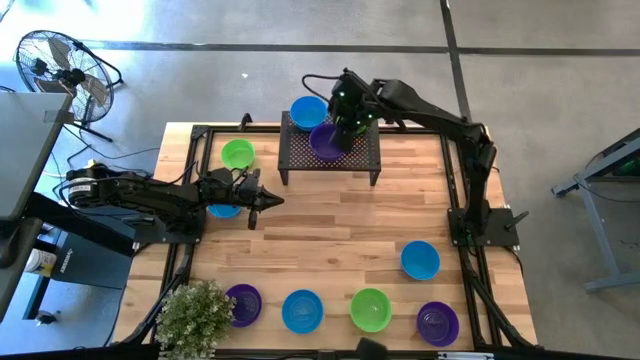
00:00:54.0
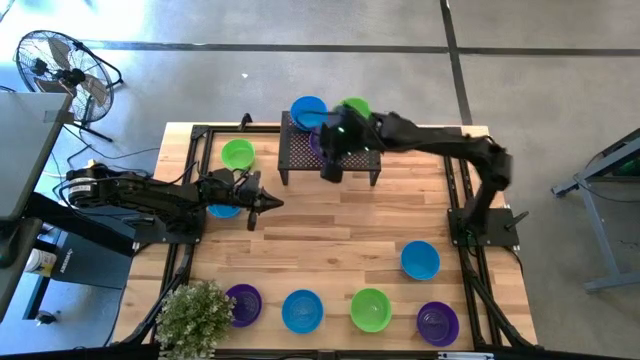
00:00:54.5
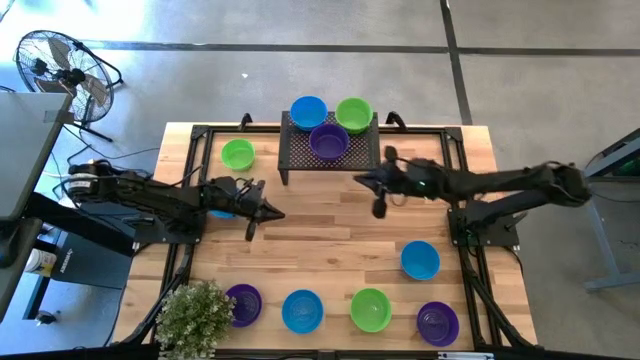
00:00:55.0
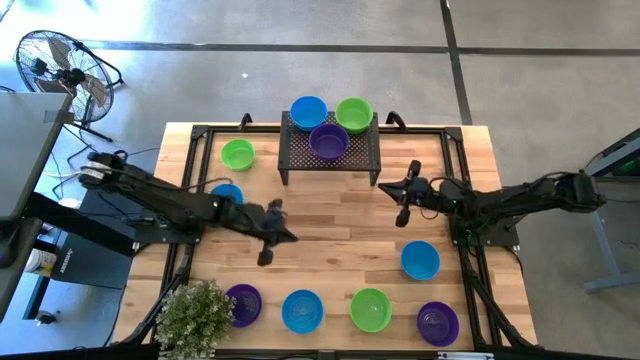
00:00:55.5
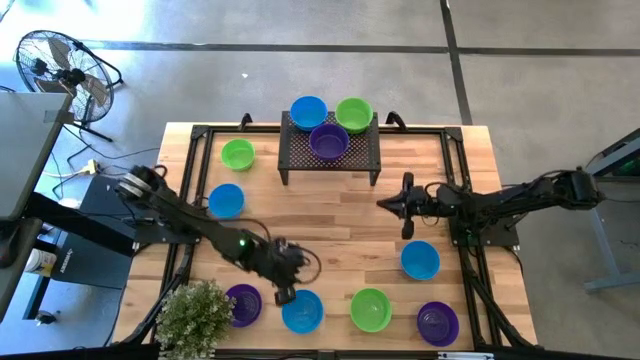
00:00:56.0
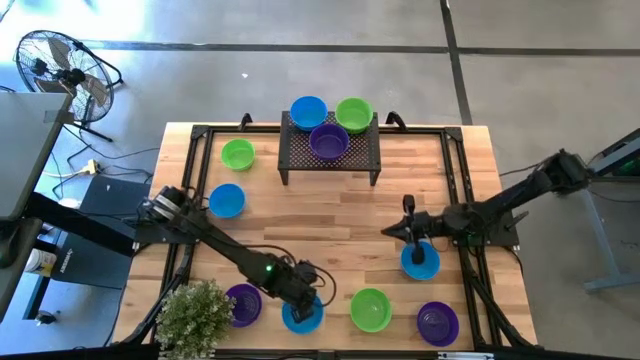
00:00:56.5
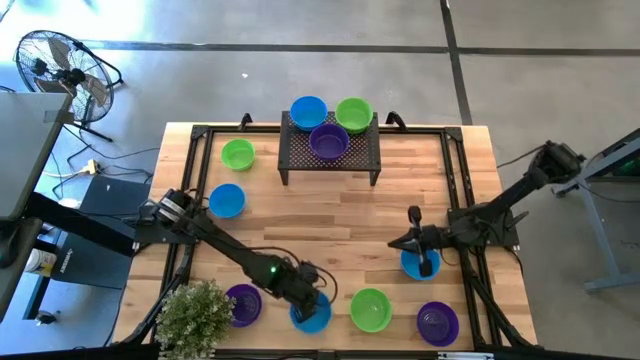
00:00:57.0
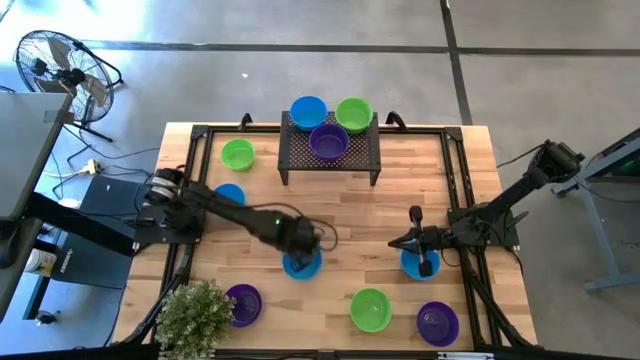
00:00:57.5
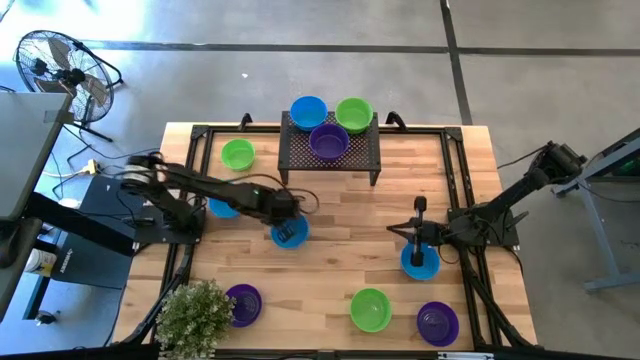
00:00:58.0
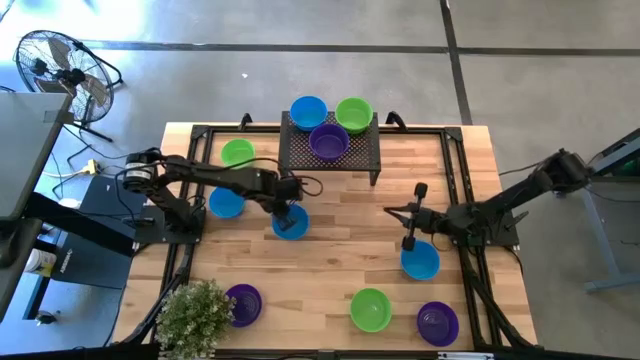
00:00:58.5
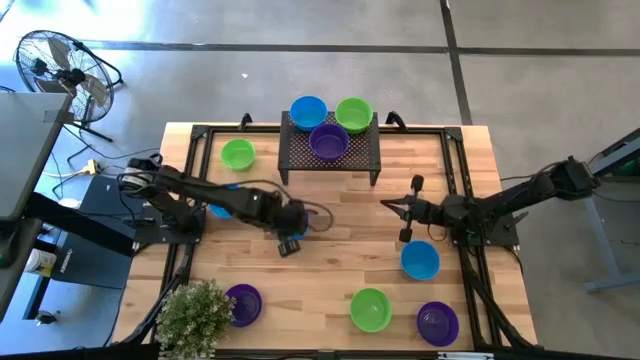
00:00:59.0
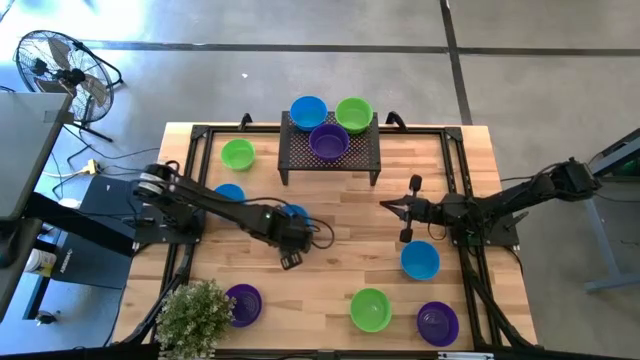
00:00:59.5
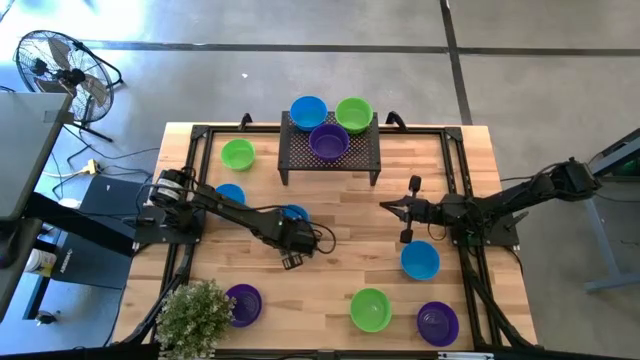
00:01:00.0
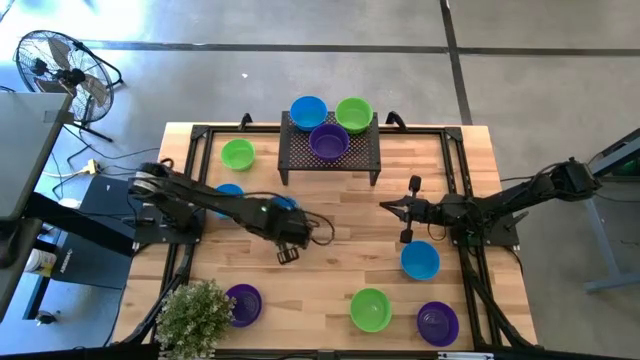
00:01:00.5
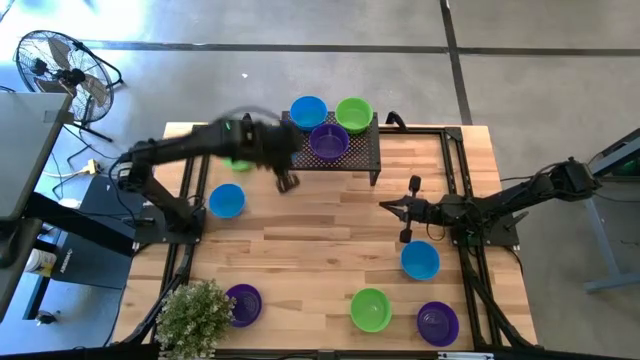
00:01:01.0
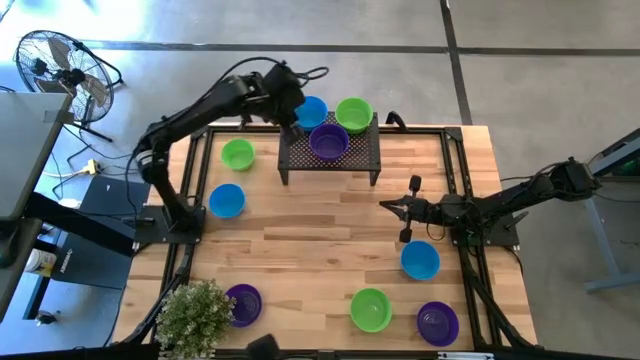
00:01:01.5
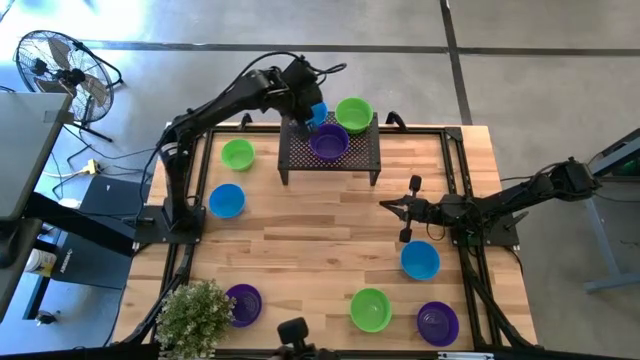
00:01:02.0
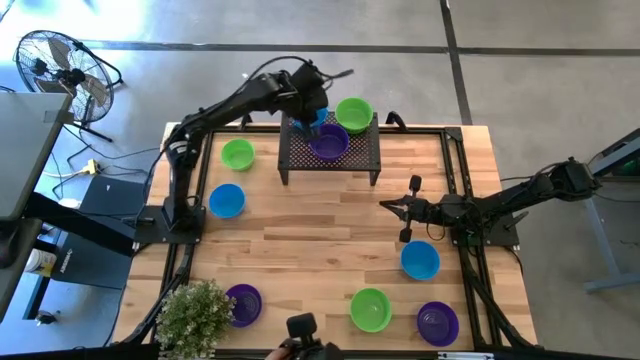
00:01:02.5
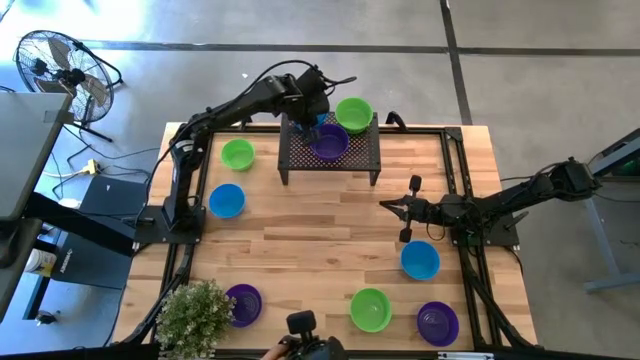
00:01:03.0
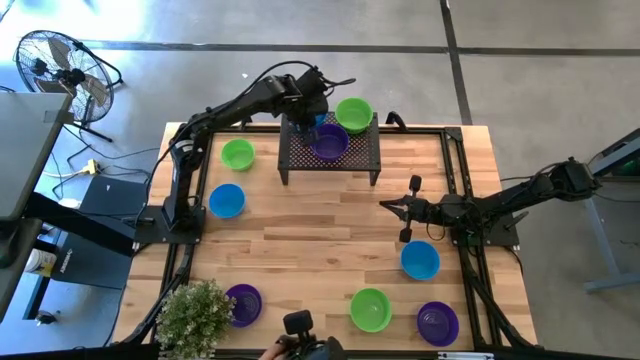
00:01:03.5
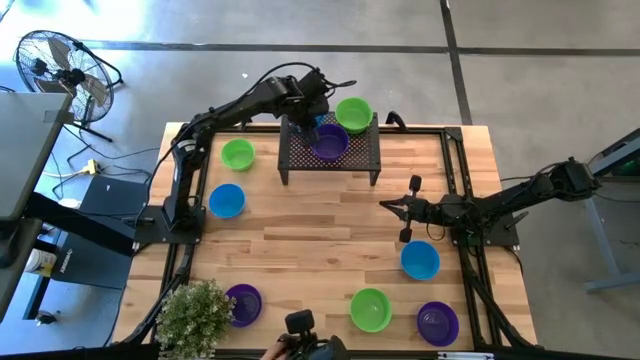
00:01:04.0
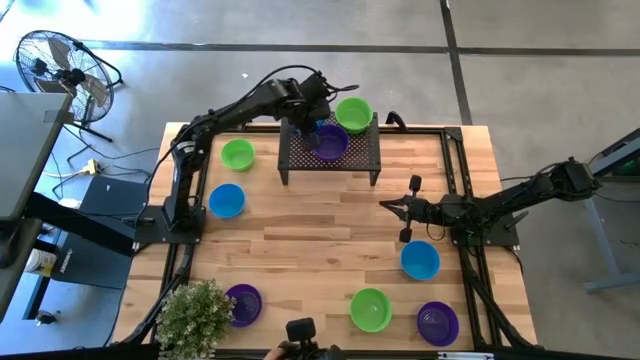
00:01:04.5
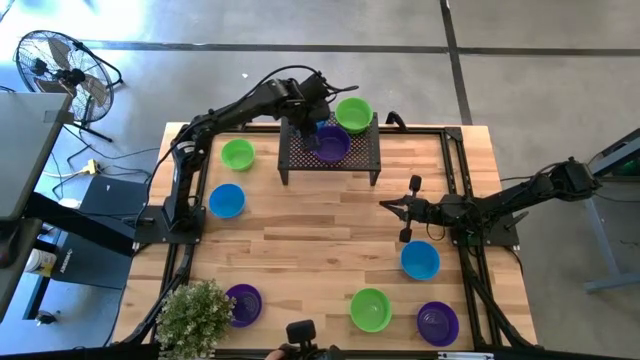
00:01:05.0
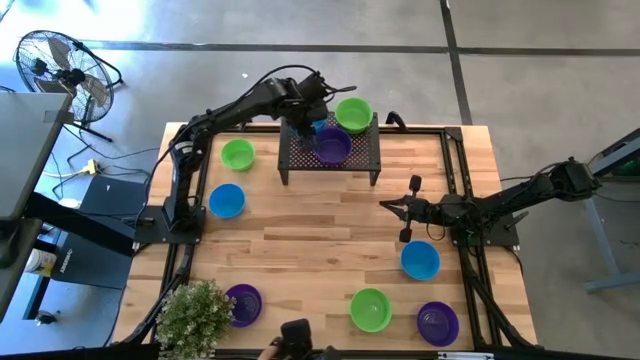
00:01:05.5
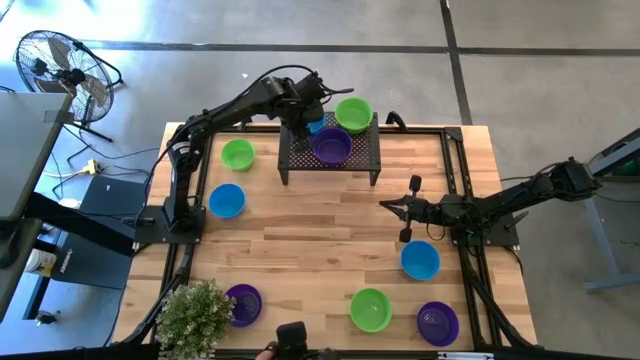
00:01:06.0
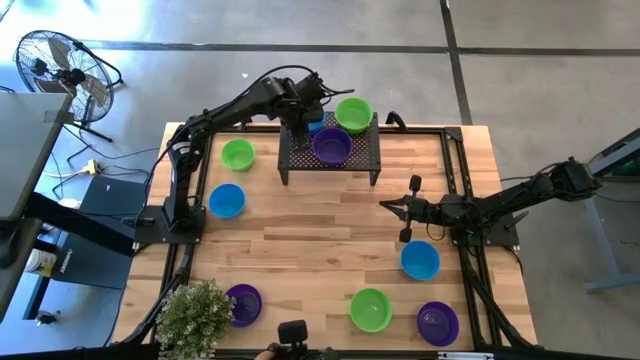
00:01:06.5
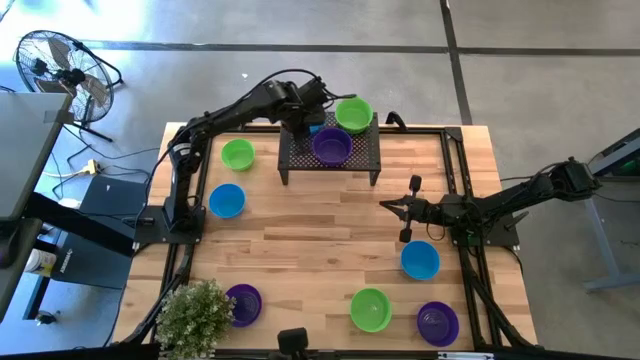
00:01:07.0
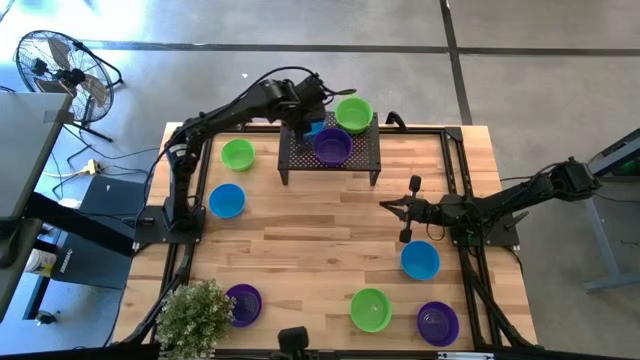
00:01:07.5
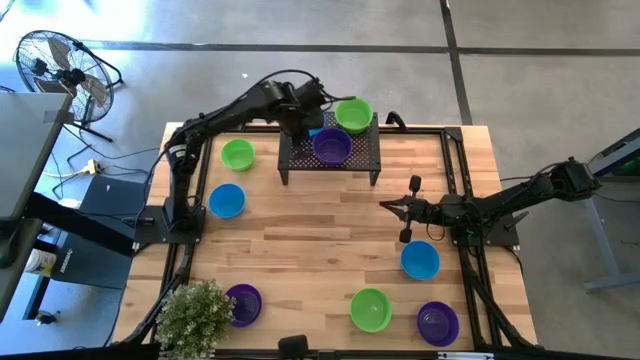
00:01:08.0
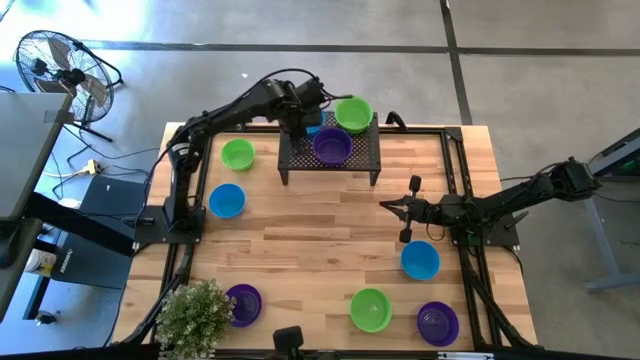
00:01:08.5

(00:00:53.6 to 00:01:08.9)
Task: Pick & Place Mini bowls
Stack the bottom blue bowl on the blue bowl on the shelf

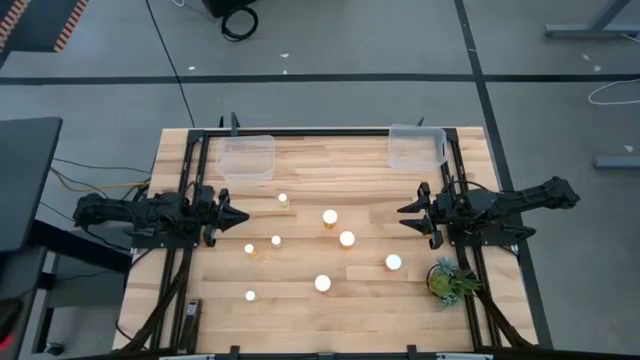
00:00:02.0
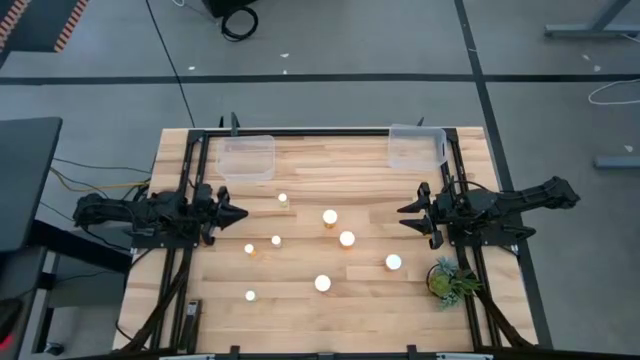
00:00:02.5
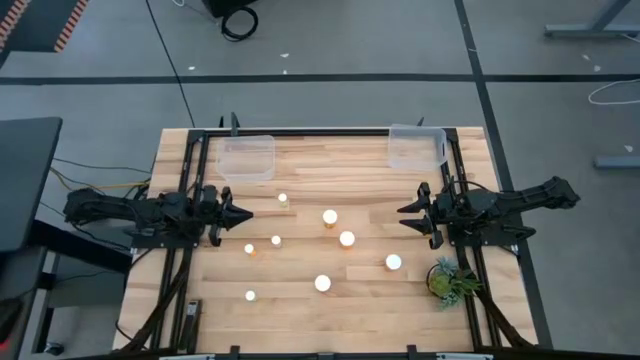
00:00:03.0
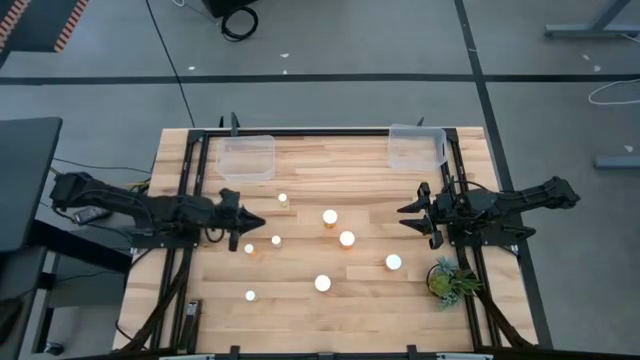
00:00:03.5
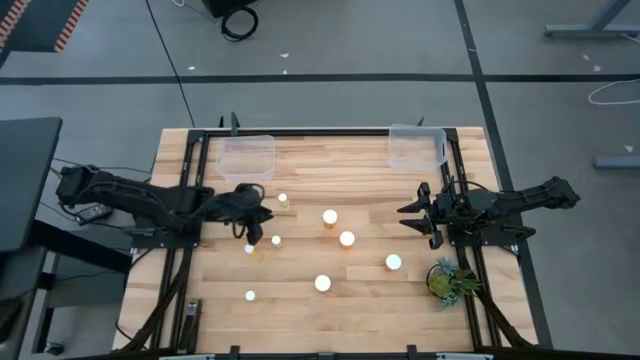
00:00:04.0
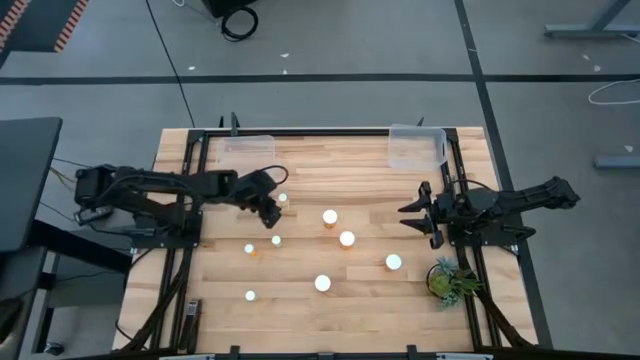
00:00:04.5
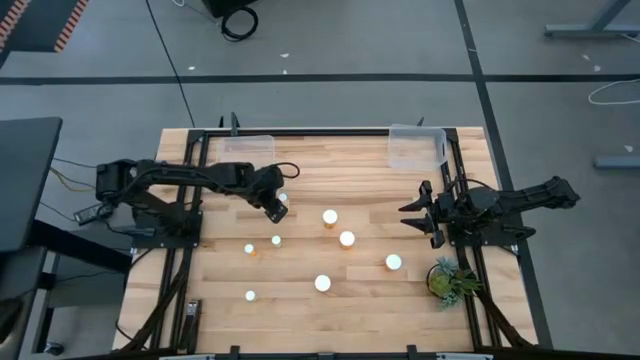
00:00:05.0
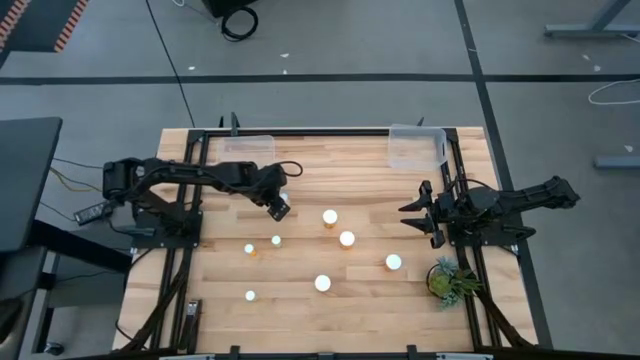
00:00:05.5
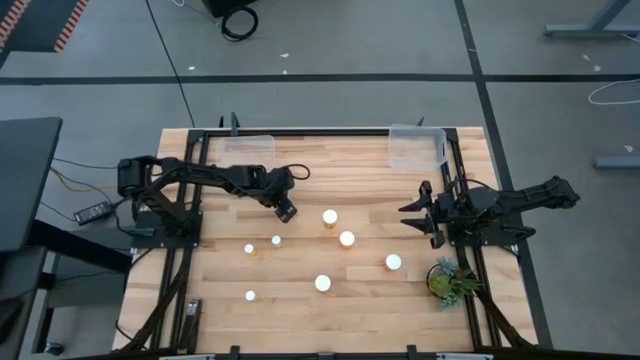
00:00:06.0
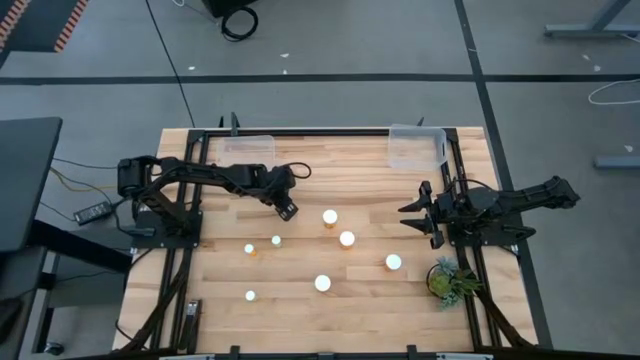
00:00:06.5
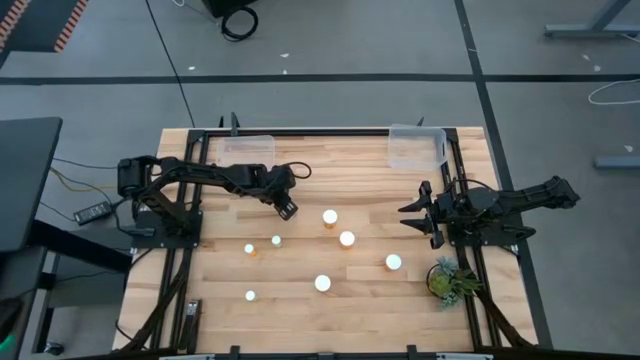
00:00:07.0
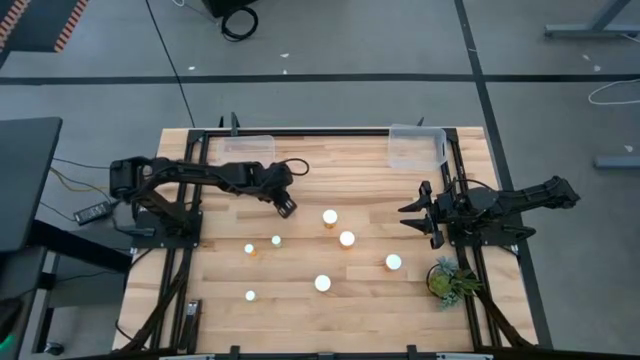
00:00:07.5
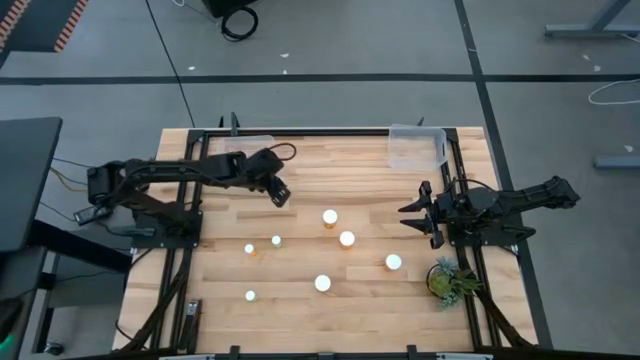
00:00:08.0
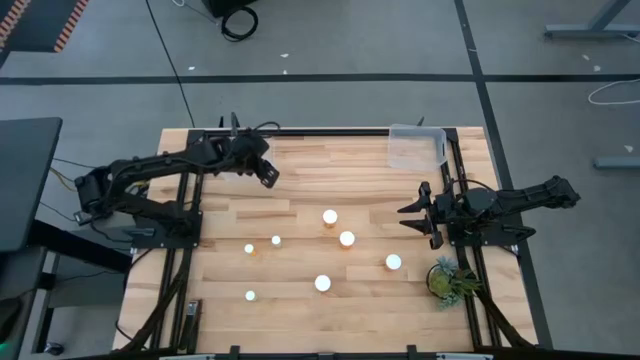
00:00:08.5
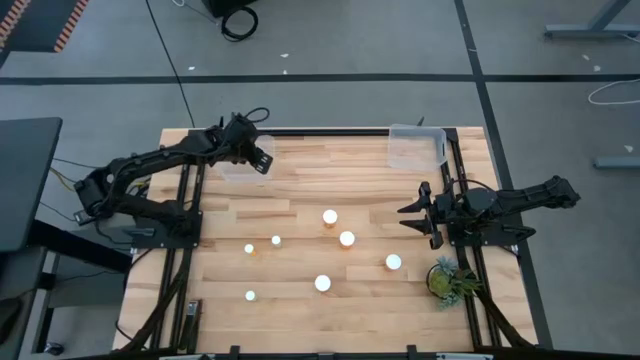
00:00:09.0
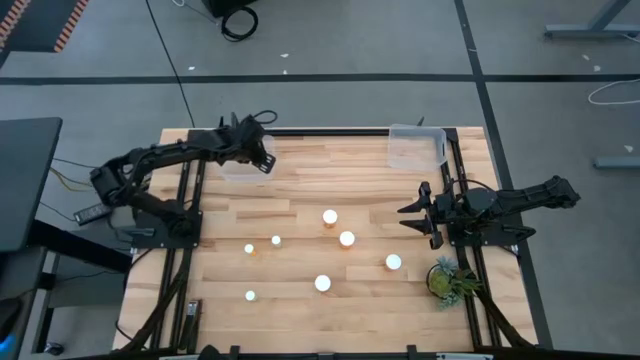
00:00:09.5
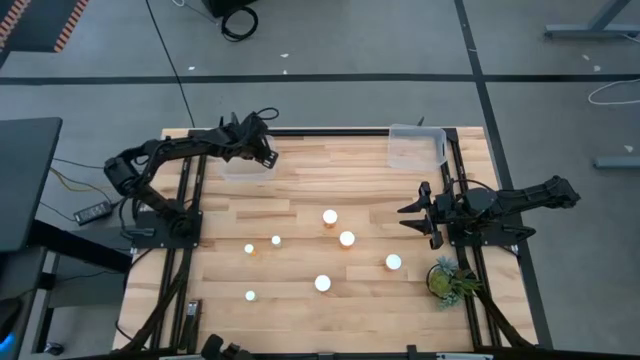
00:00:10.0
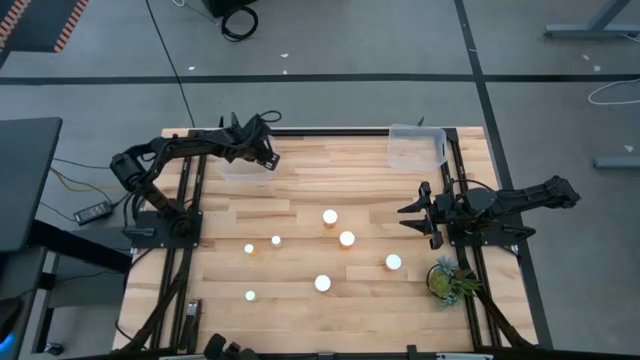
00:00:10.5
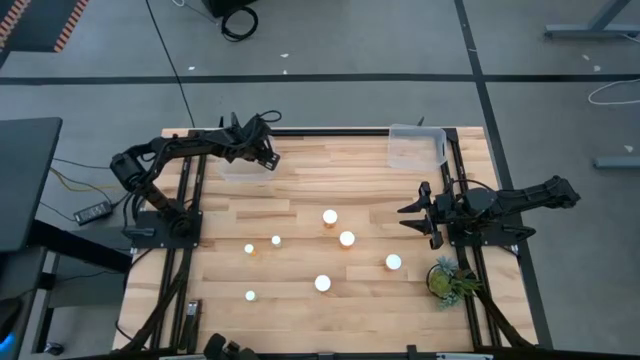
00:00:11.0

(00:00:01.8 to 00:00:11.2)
Task: Pick and place medicine bottles into bin by pill shape (circle, oval)
Put the top yellow tablet bottle into the left transparent bin
